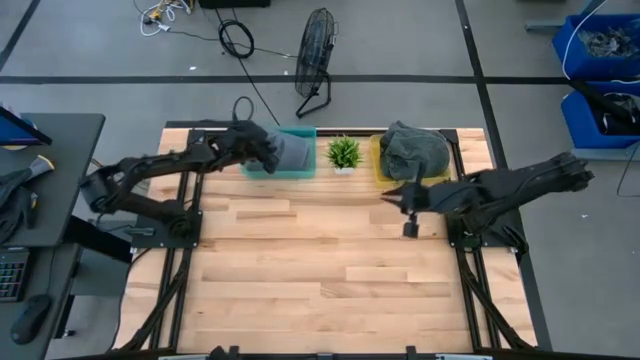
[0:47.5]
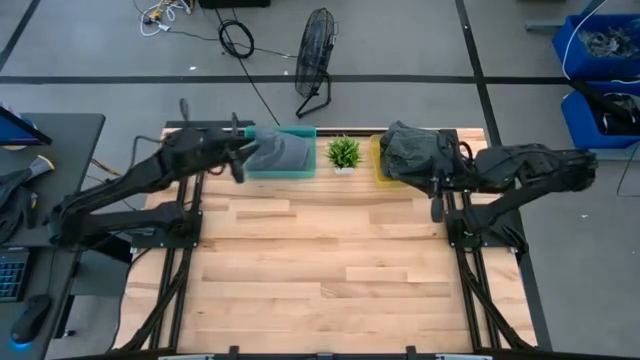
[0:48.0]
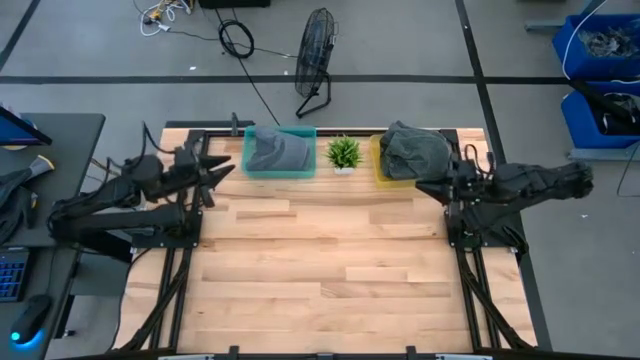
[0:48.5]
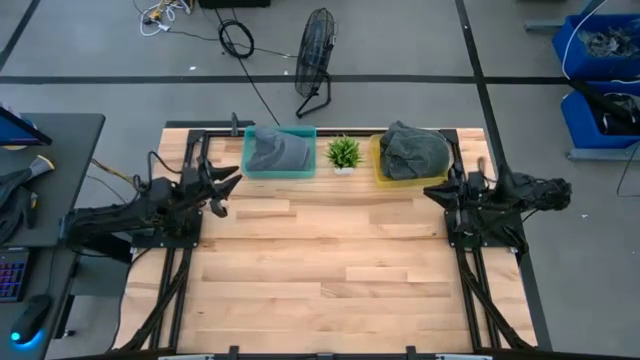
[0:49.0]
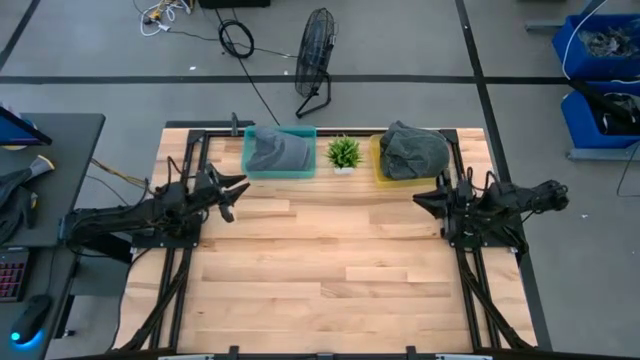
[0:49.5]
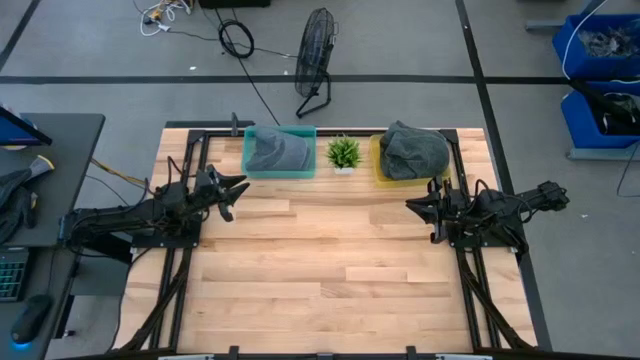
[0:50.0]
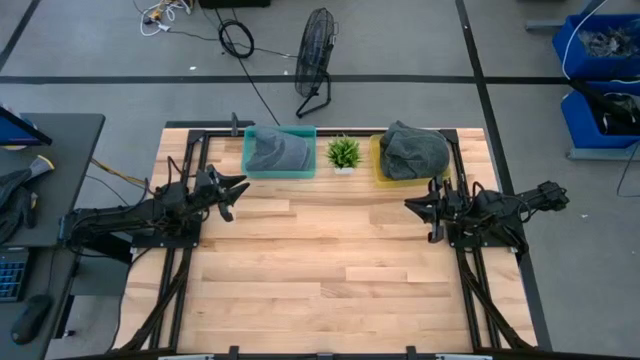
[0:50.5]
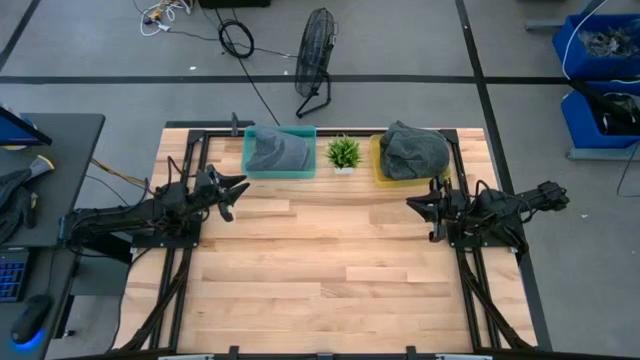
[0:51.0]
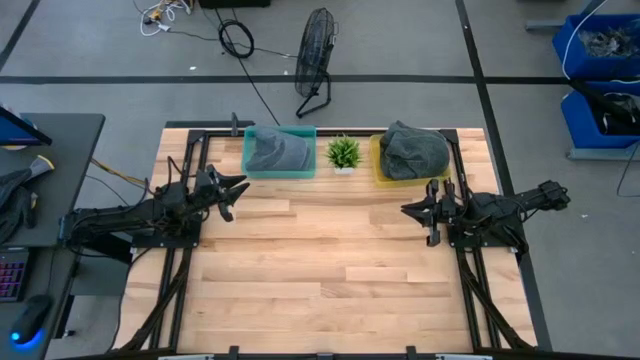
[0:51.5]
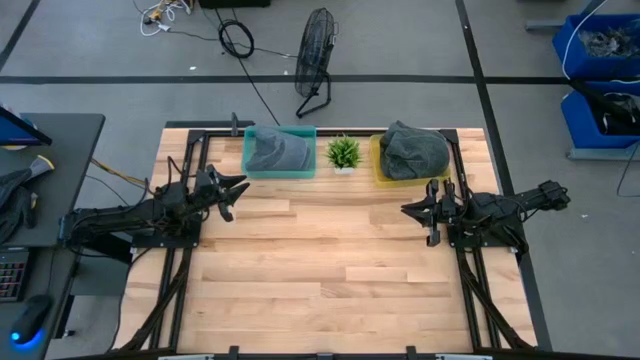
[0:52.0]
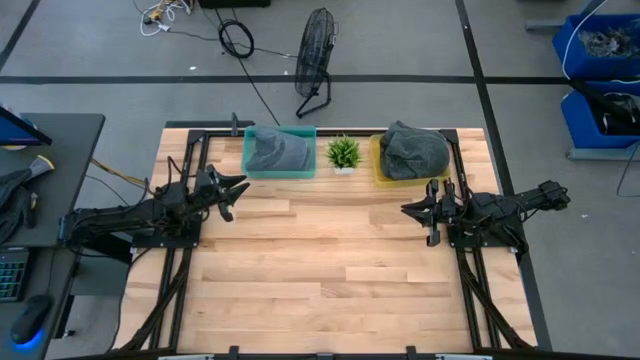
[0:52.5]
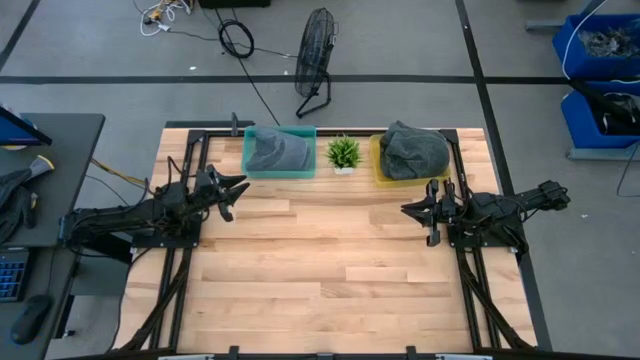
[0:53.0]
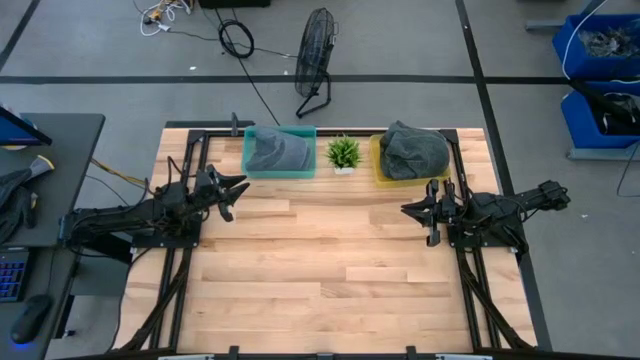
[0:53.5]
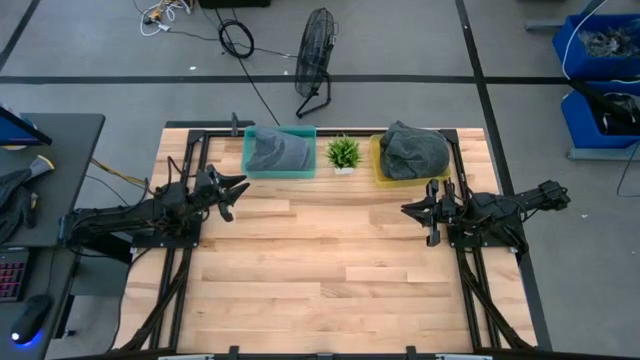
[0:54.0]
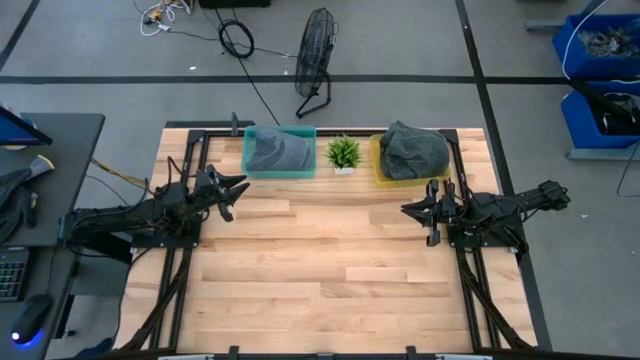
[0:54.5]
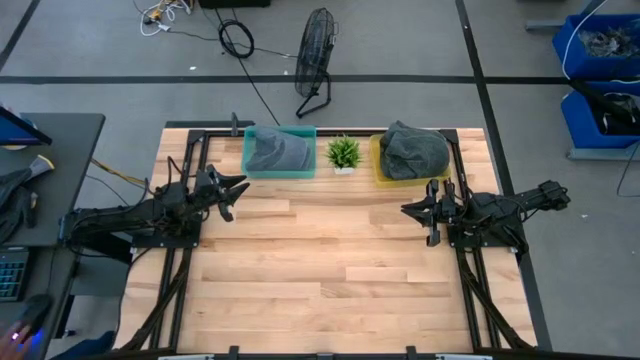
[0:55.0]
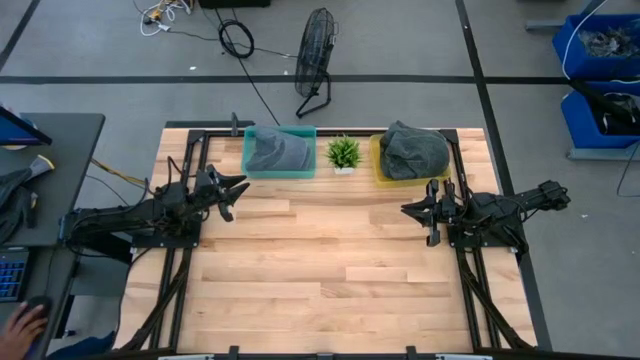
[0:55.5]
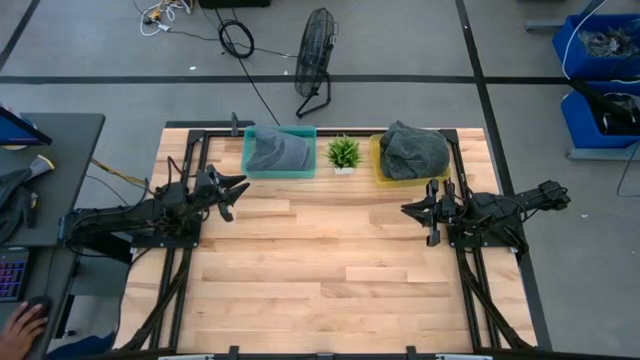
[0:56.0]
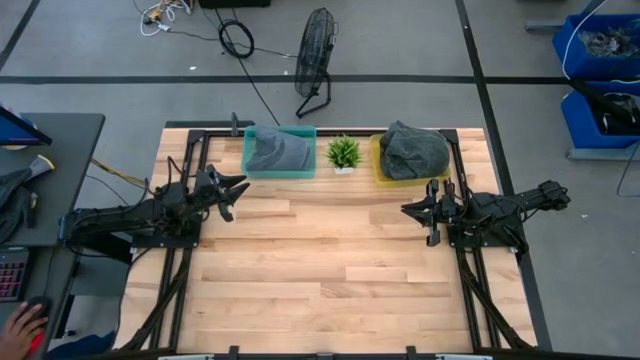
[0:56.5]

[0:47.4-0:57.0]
Task: Pick & Place hat
Return to Home Position

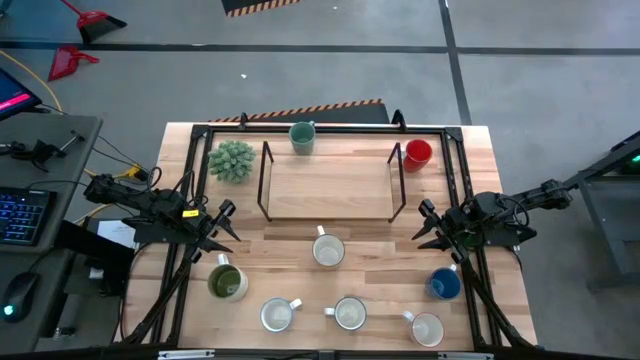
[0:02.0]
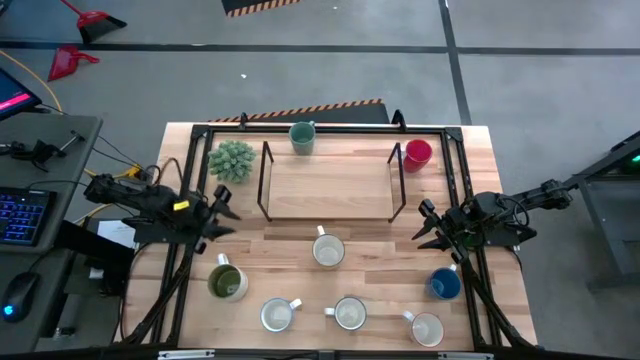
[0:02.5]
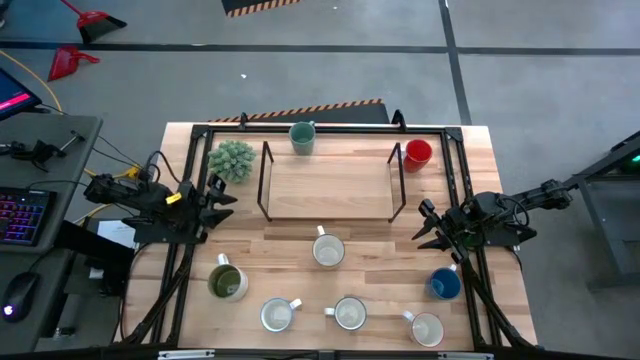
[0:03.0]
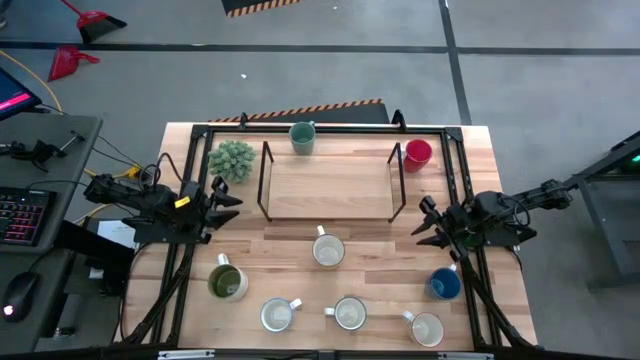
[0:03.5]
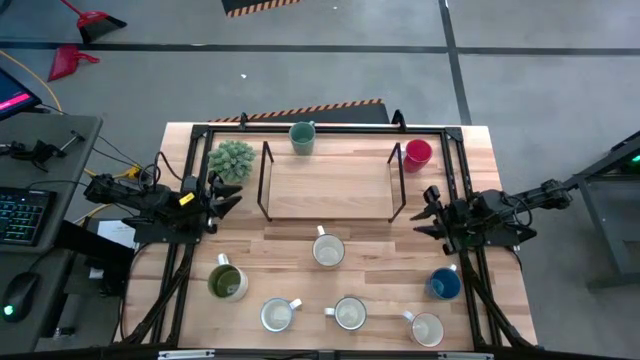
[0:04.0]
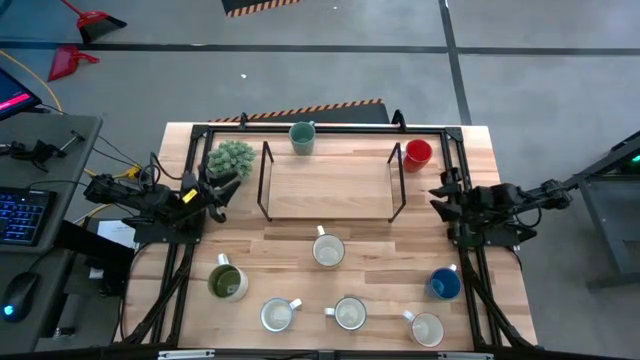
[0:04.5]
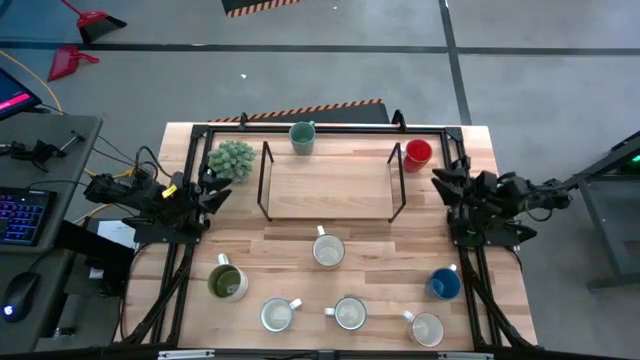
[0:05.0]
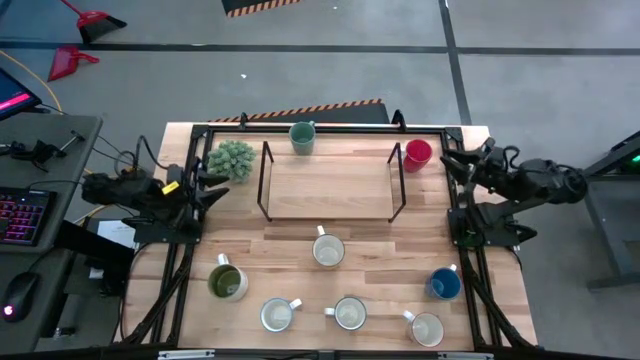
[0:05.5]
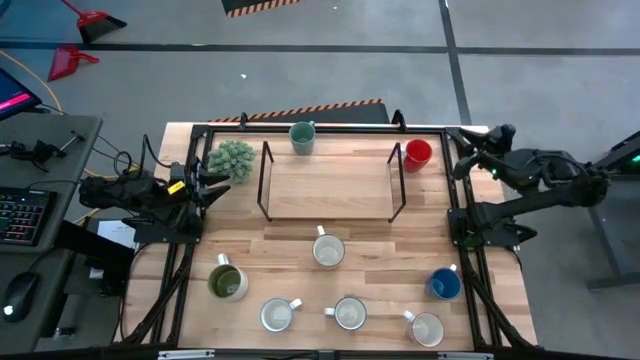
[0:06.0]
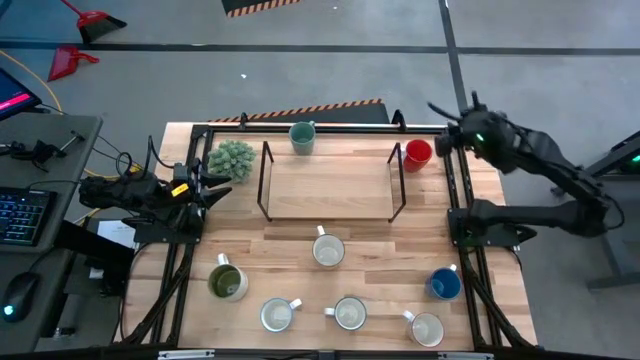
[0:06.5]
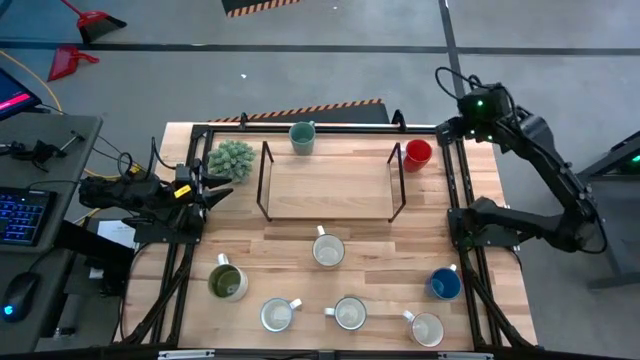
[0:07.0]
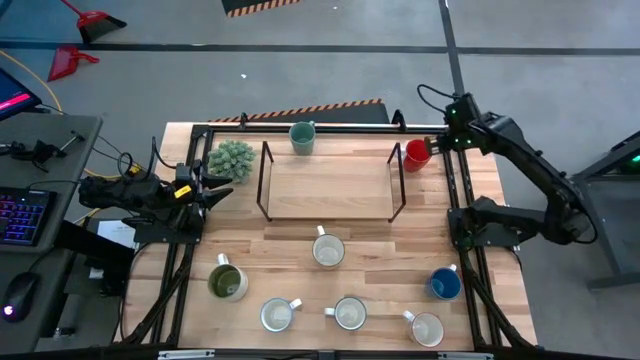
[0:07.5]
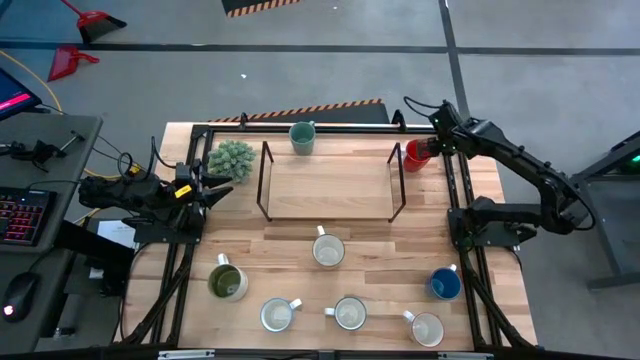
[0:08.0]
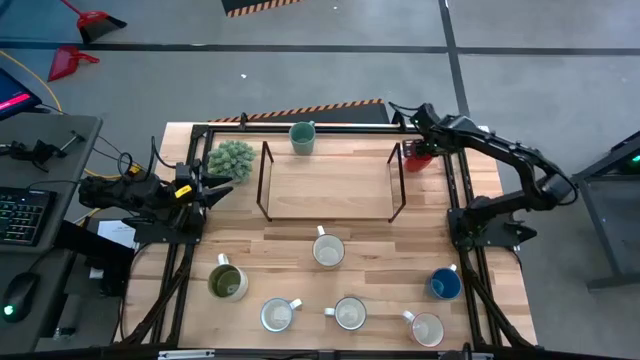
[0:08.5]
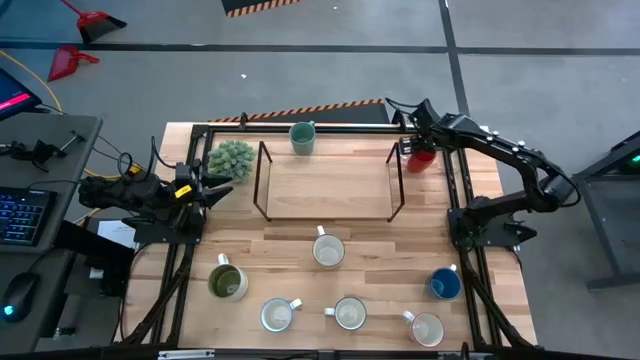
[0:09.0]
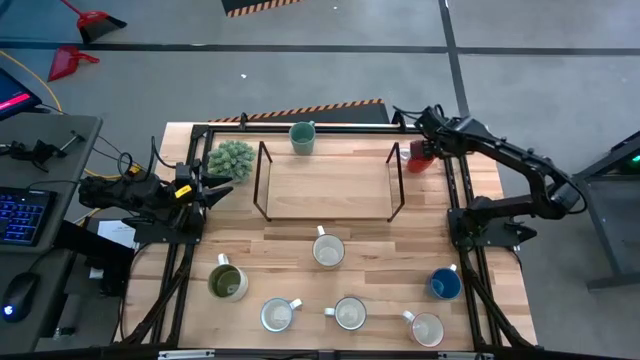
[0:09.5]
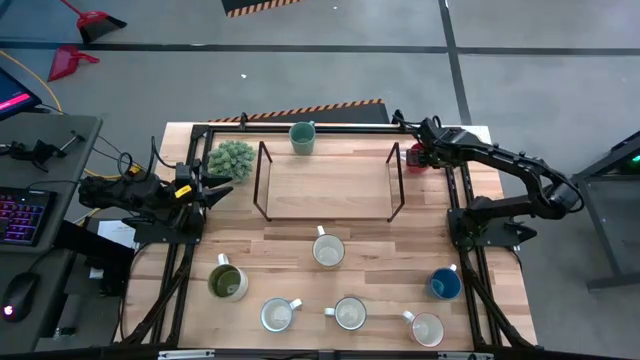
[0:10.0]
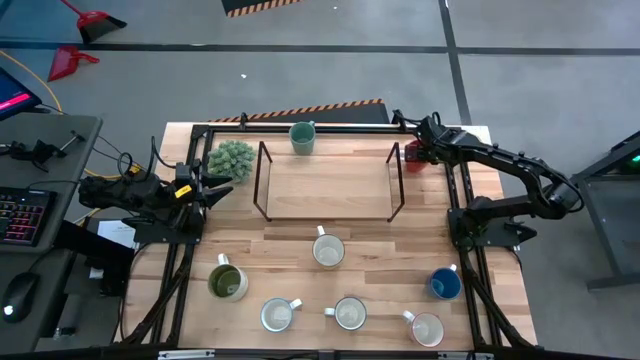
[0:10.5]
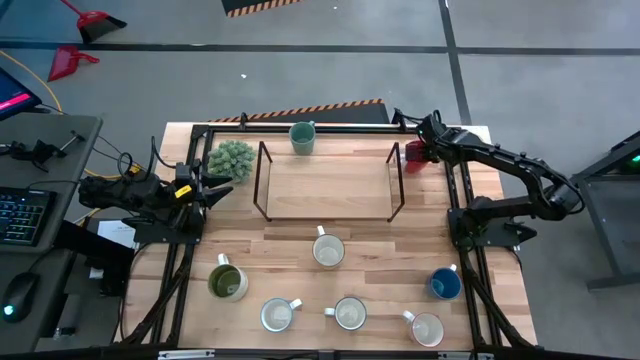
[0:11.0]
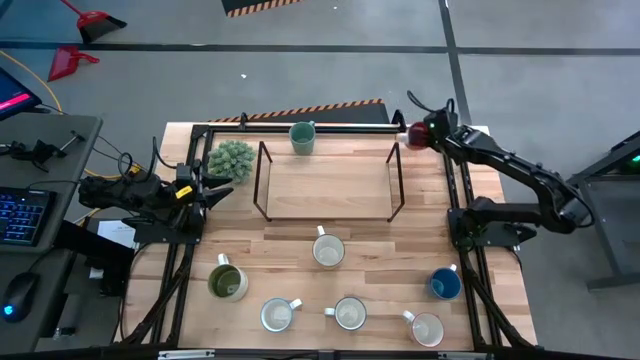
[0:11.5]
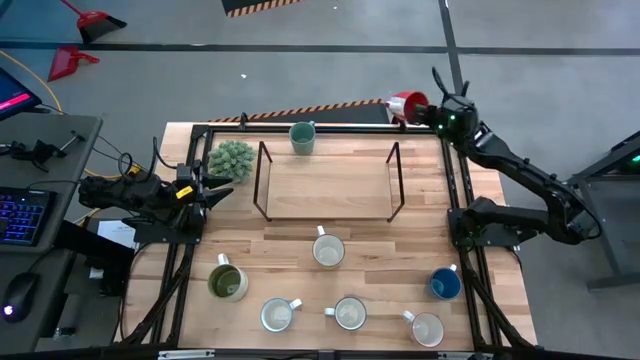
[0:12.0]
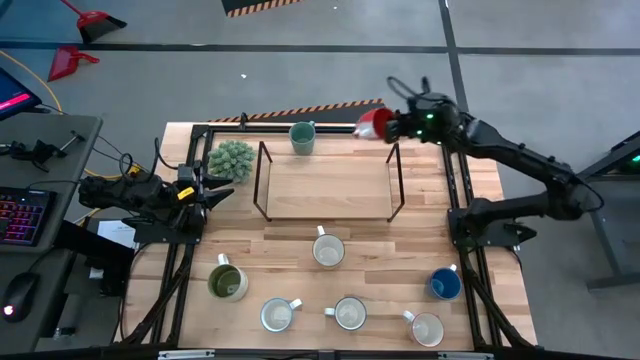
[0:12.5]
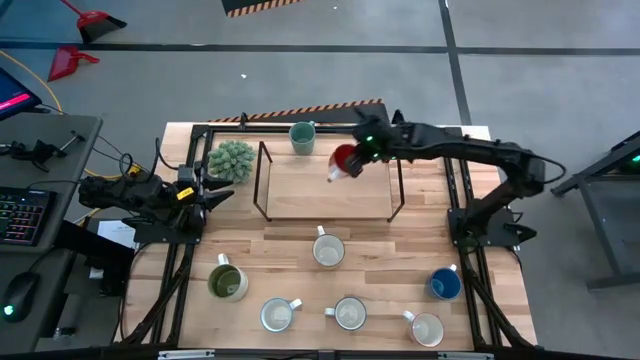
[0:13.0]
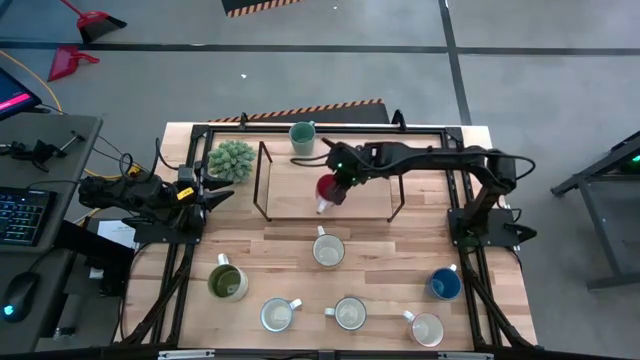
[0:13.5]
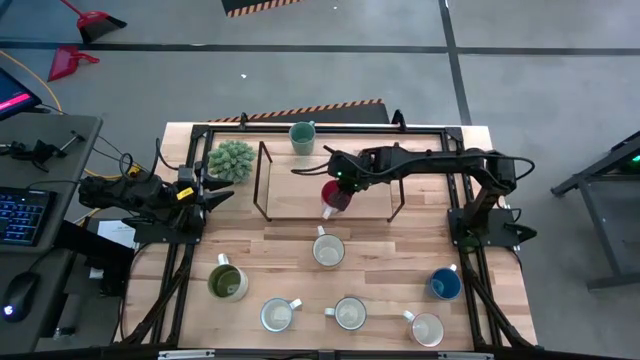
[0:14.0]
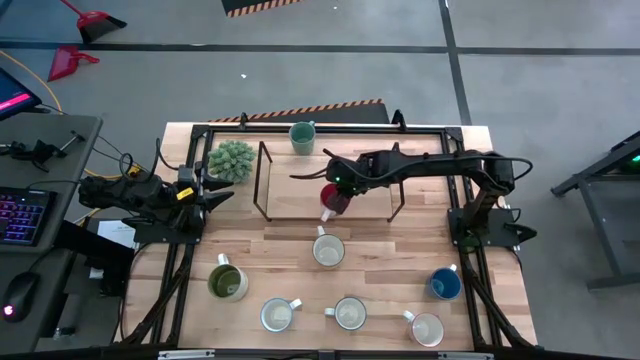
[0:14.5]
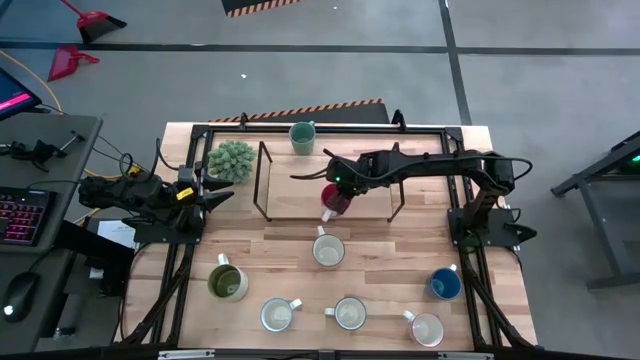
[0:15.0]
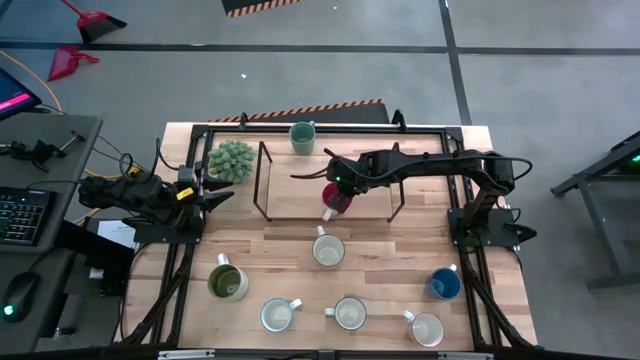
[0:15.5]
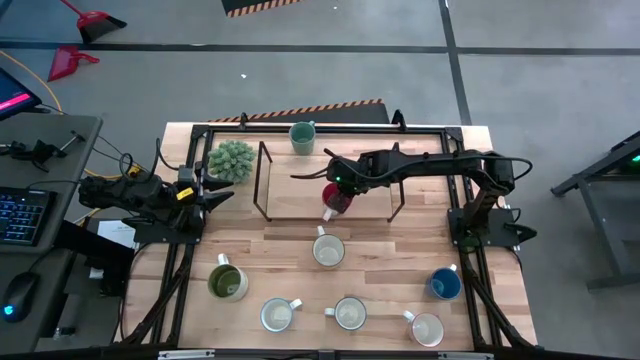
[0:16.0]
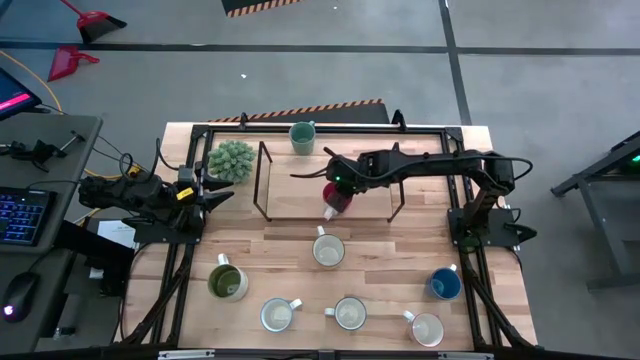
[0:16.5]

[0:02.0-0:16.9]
Task: Place coffee mugs
Put the red mug on the shelf
